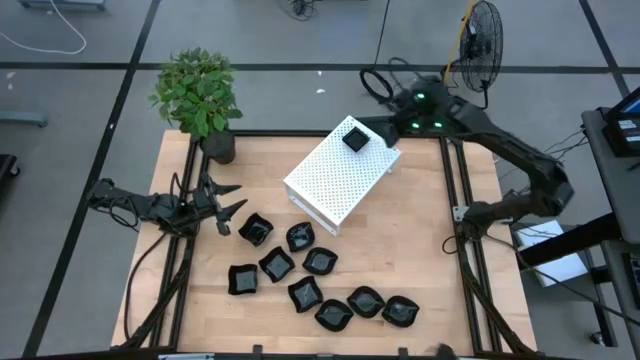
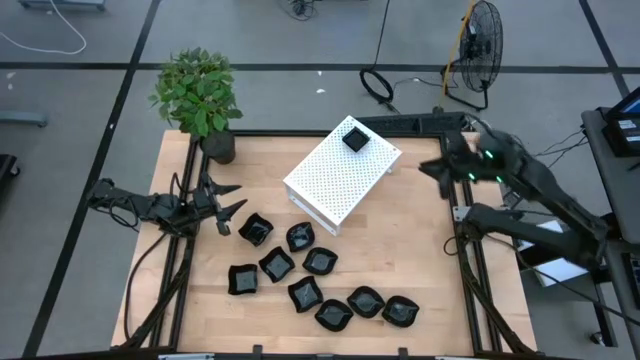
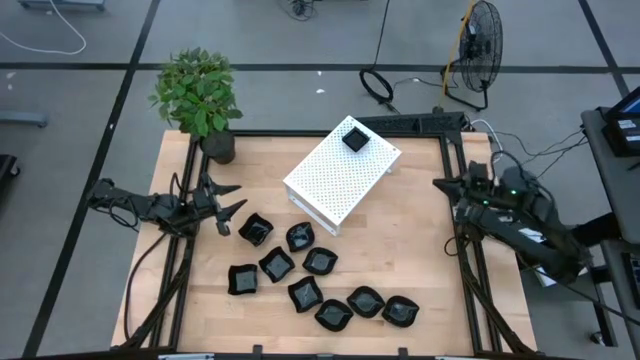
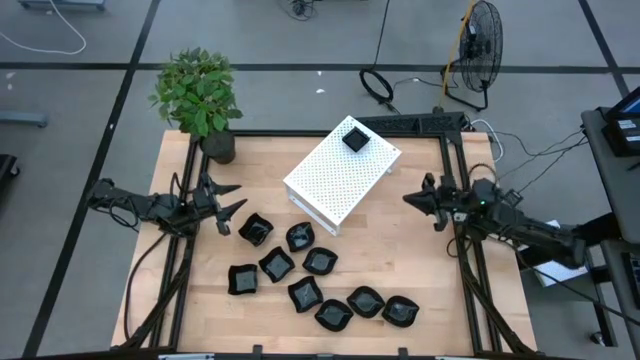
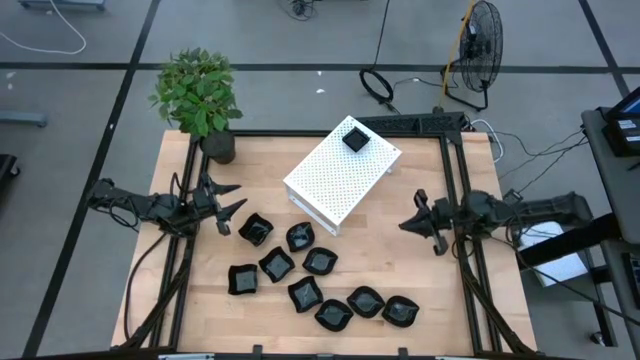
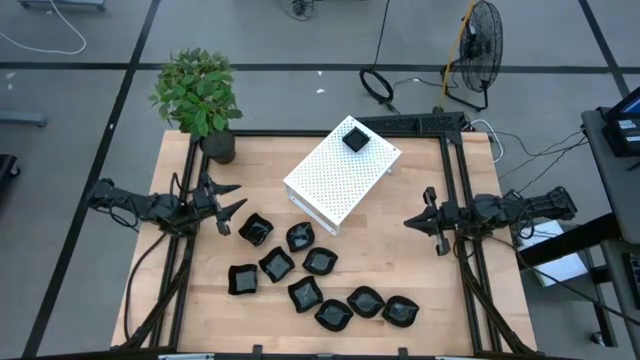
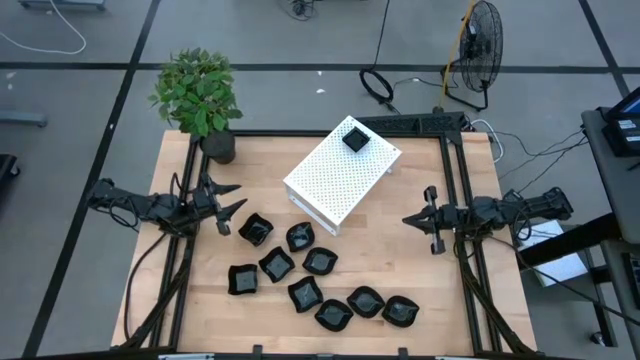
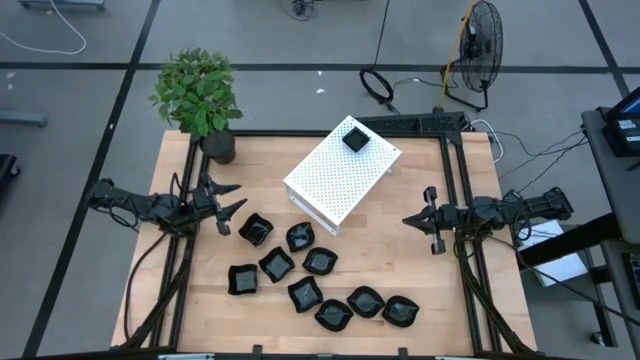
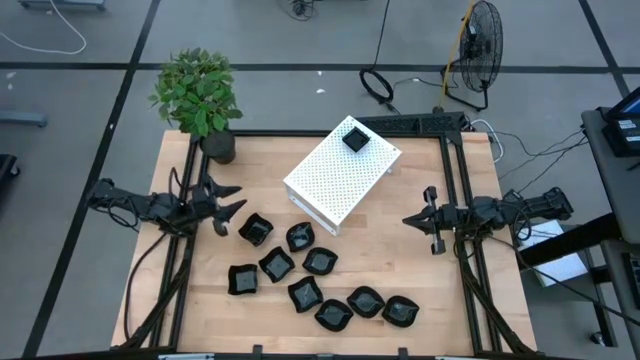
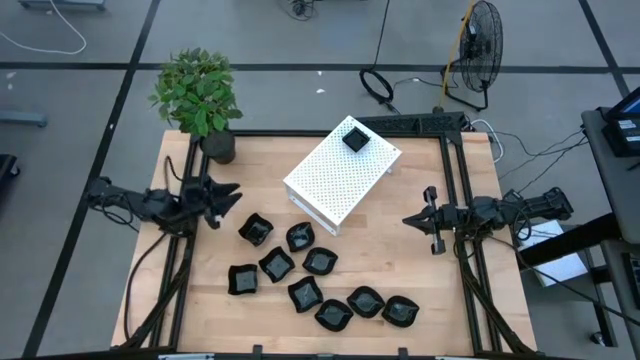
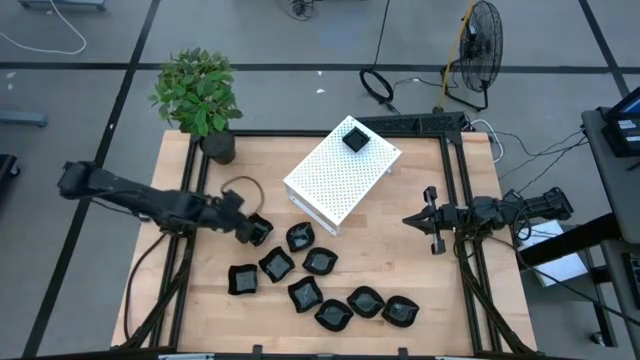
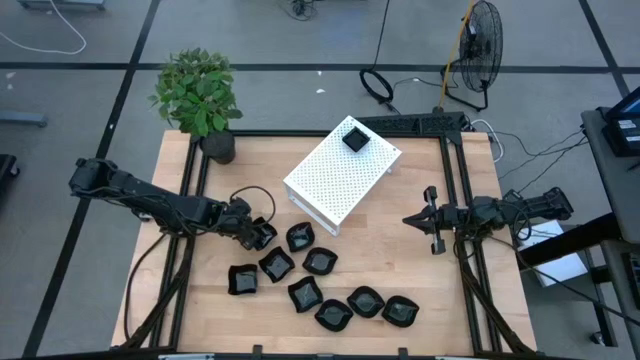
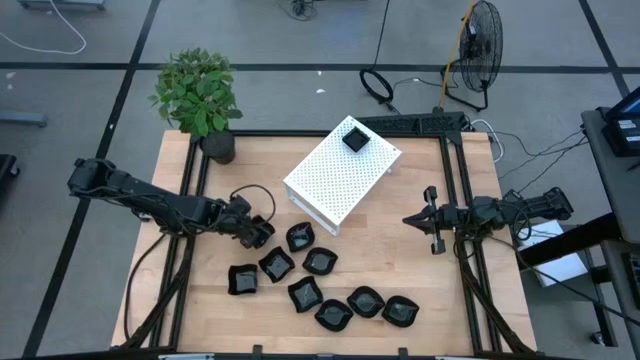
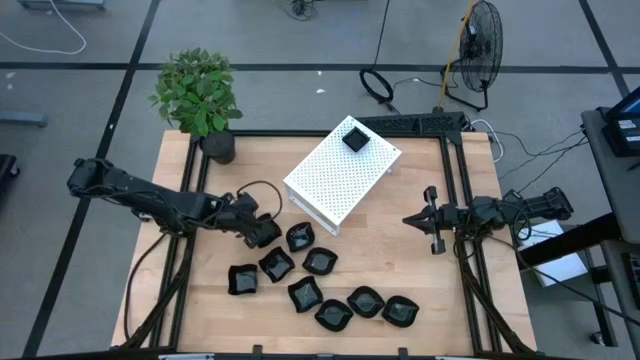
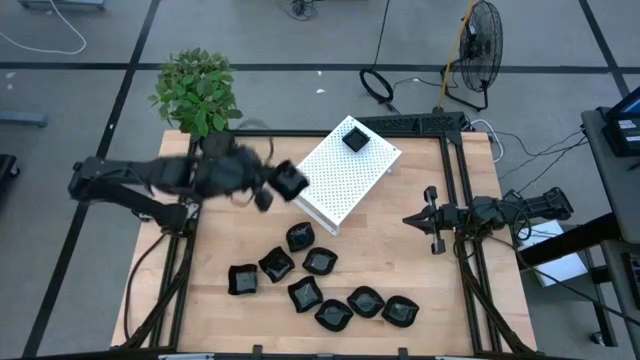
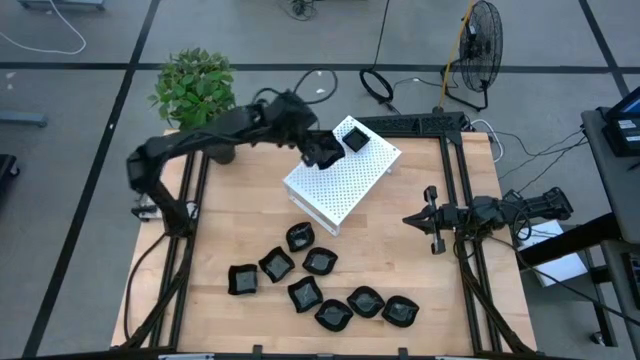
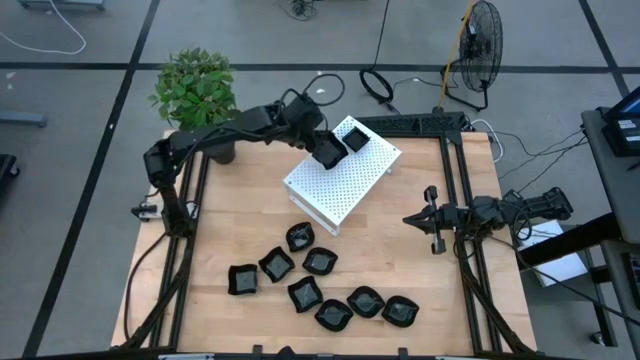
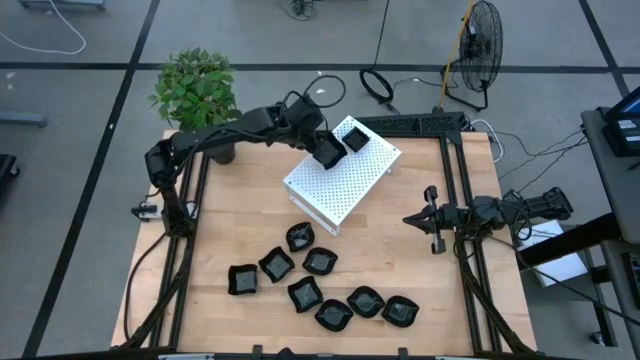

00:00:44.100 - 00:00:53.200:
Task: Pick & Place Mini shaped plates
Put the black distorted square plate on the shelf

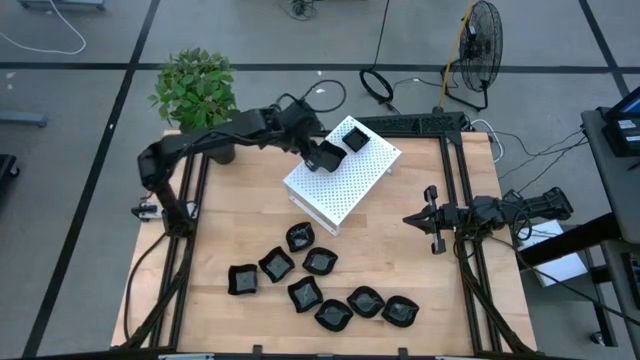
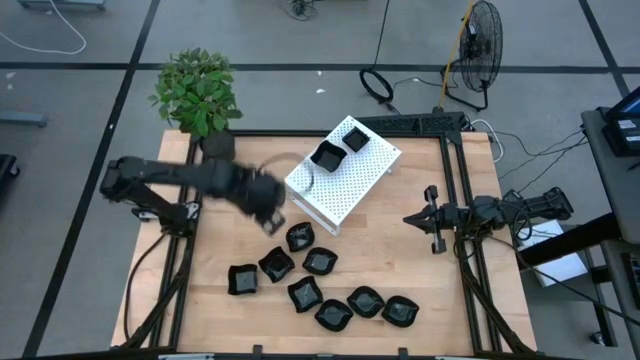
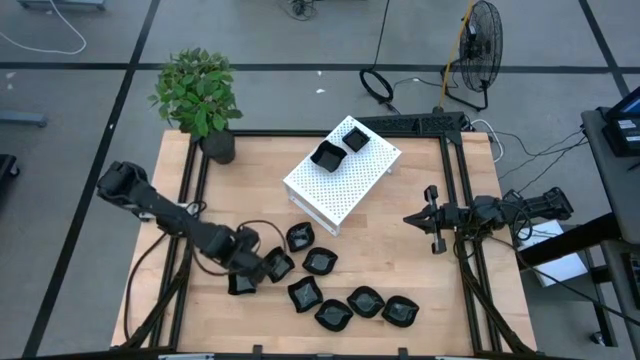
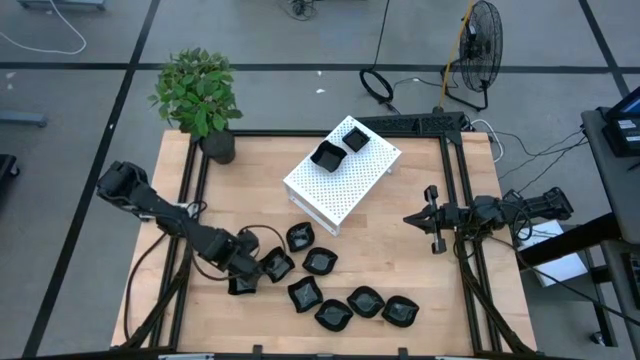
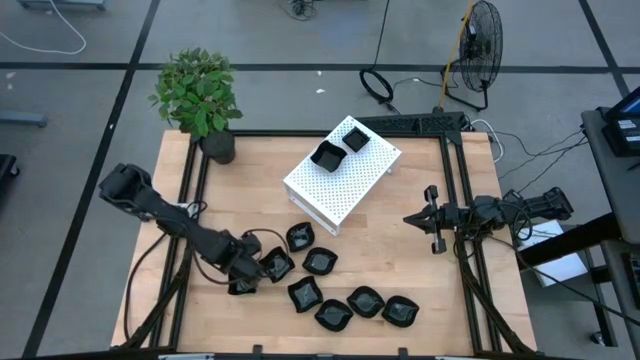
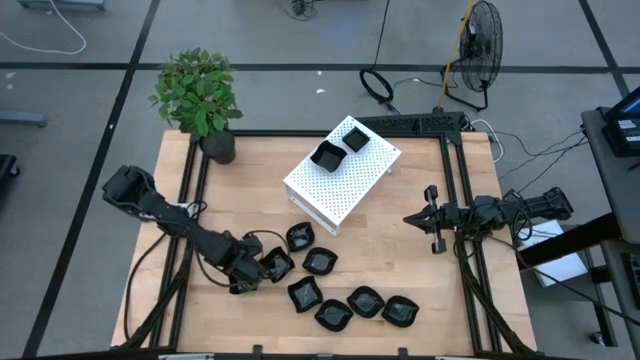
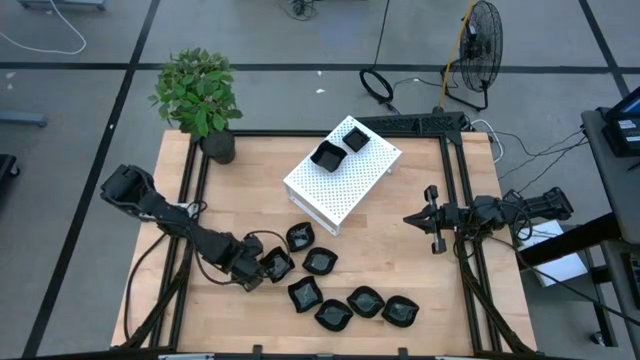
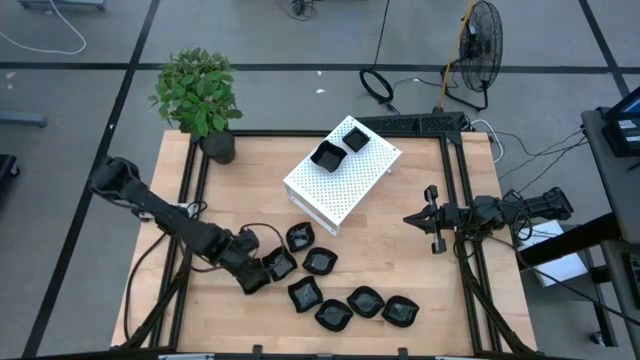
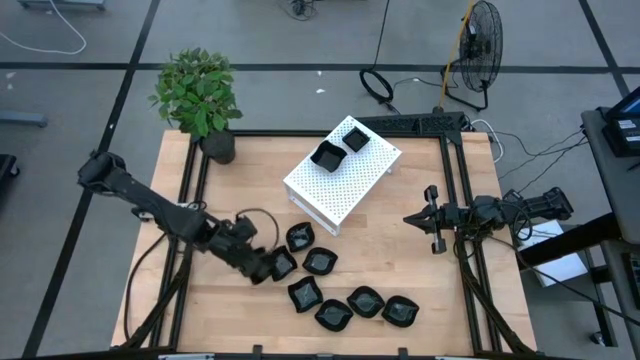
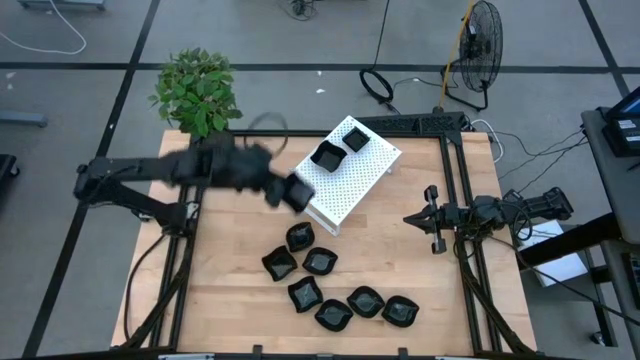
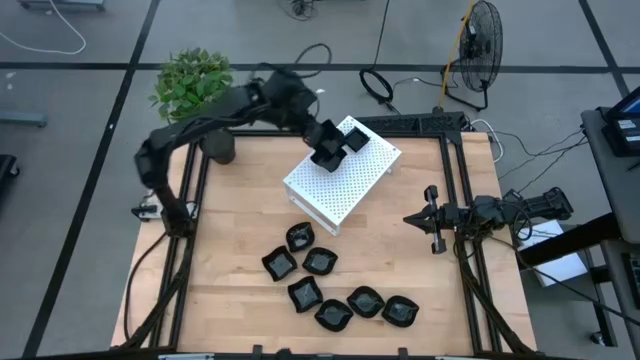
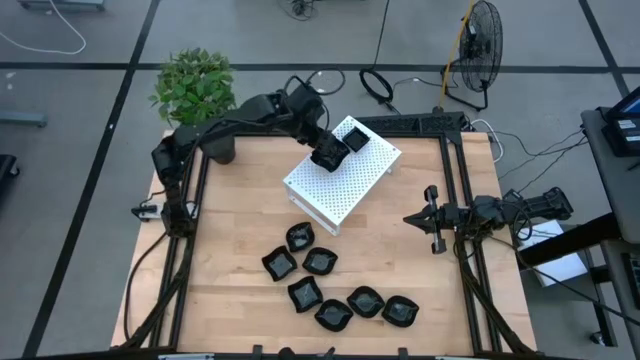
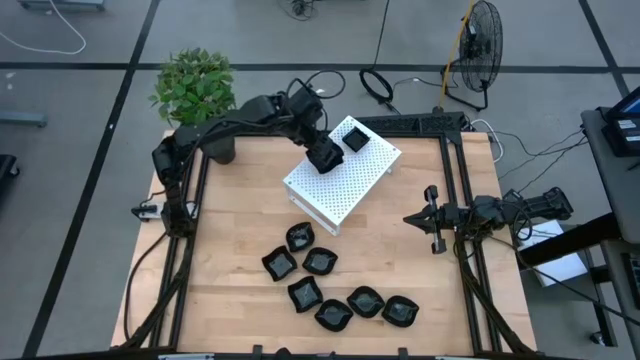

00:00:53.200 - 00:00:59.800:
Stack the black distorted square plate on top of the black distorted square plate on the shelf

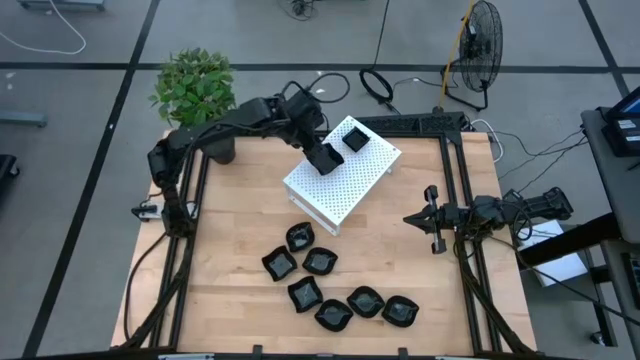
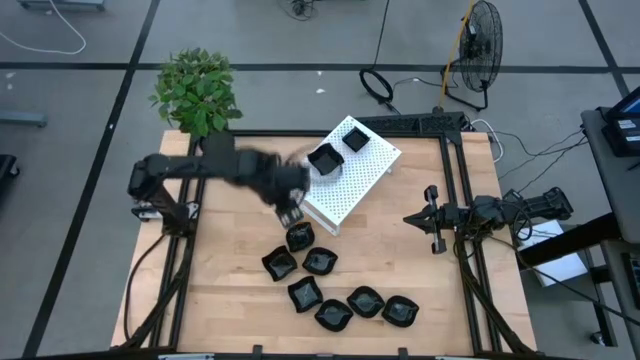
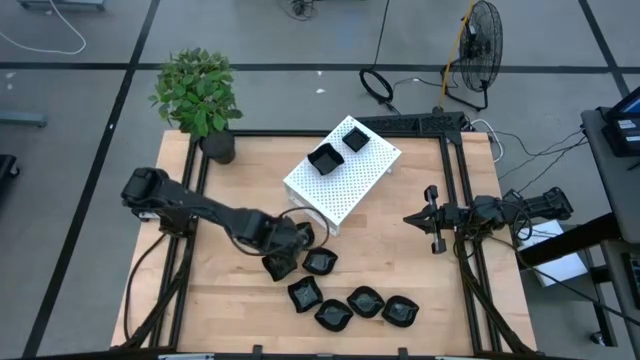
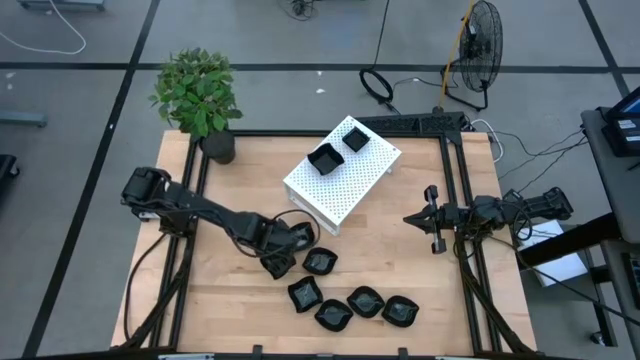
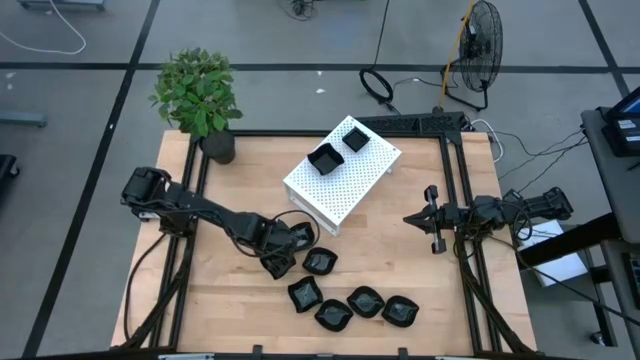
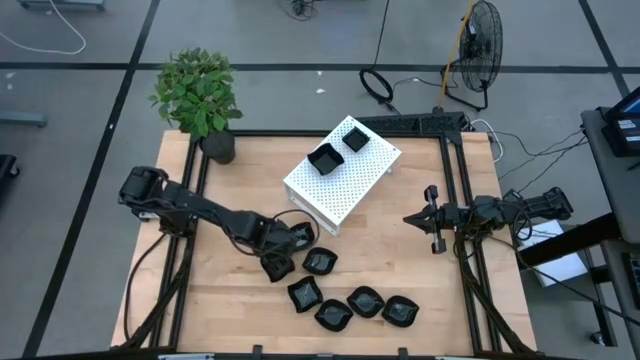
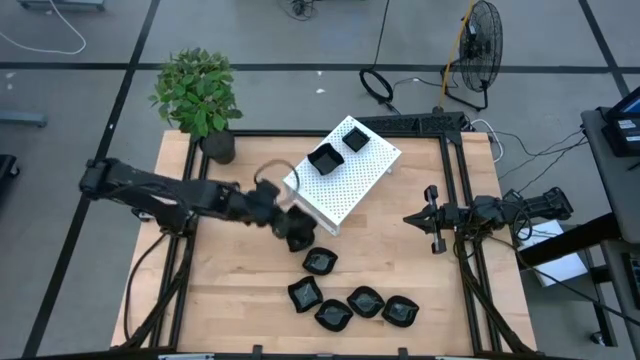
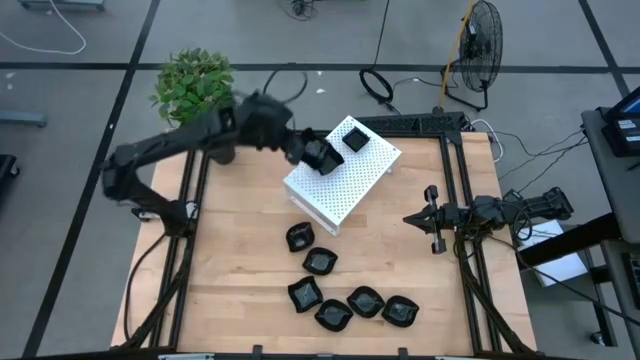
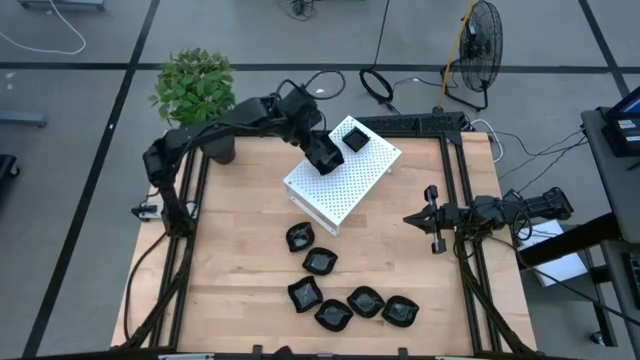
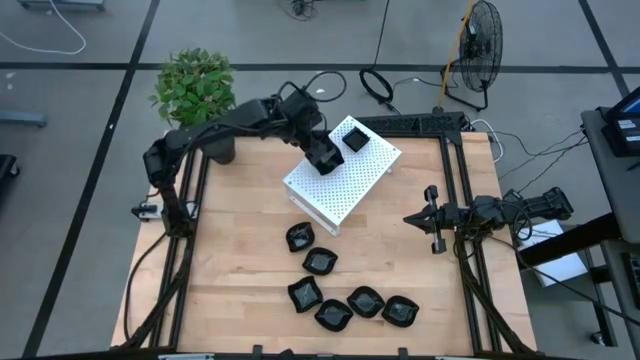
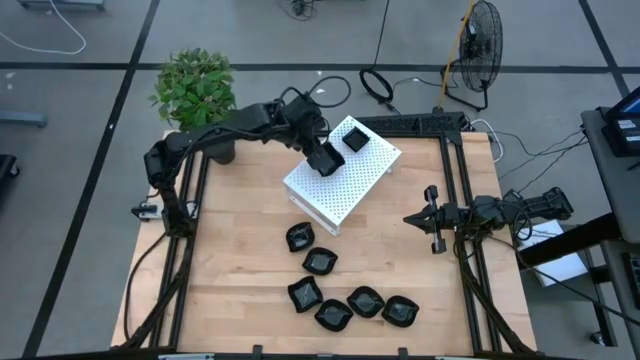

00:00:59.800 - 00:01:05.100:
Stack the black distorted square plate on top of the black distorted square plate on the shelf

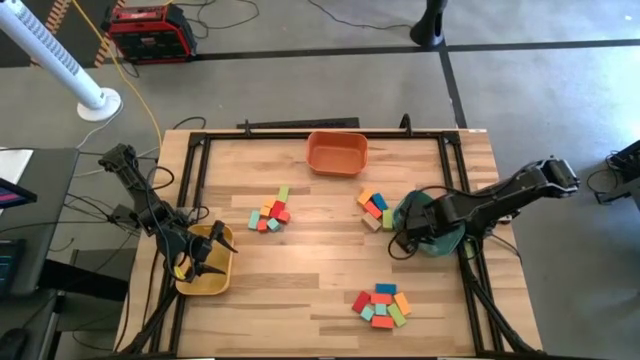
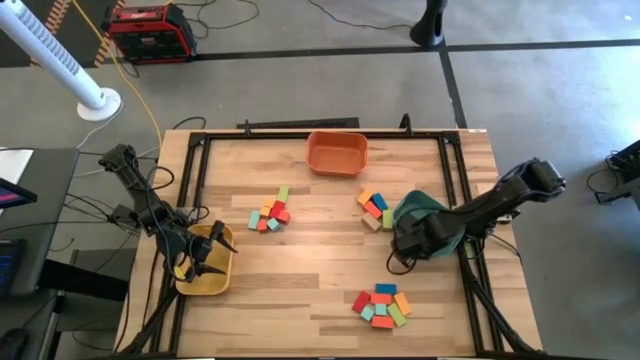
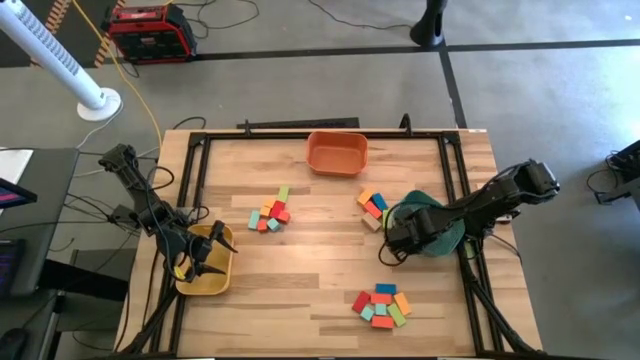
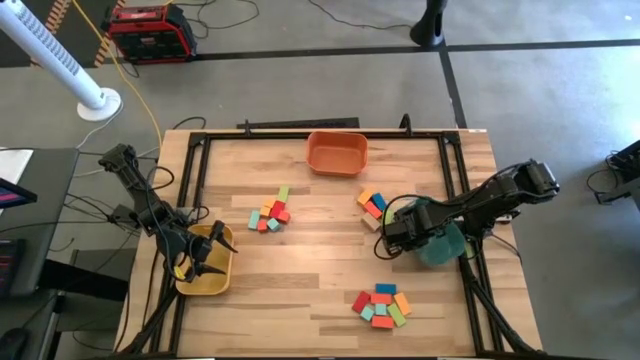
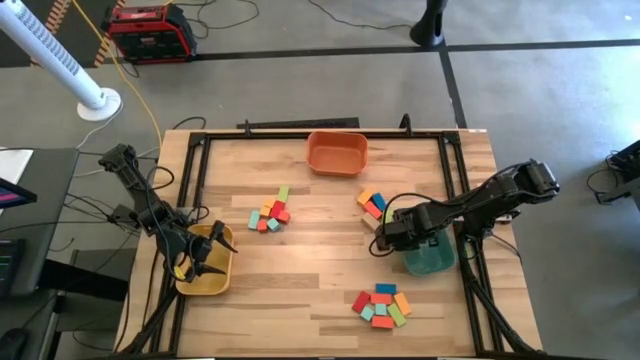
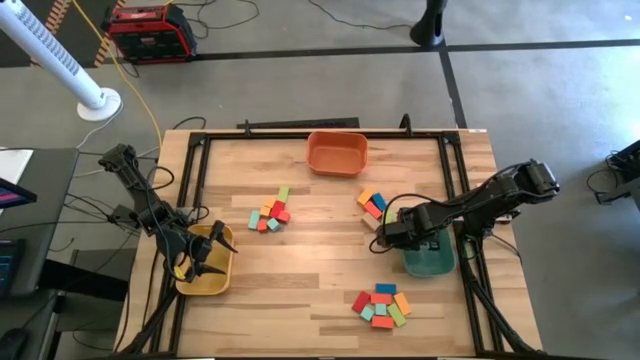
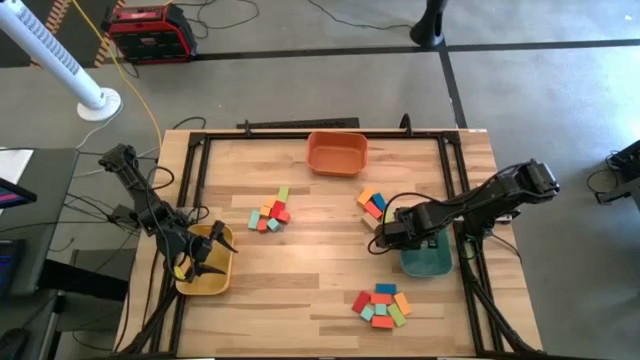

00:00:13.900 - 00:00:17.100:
Task: Sort blocks by size
Adjust the green bin
